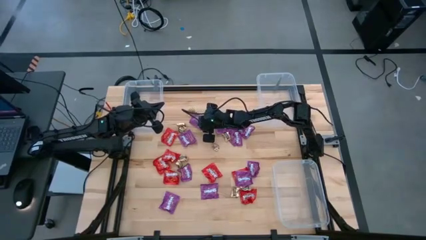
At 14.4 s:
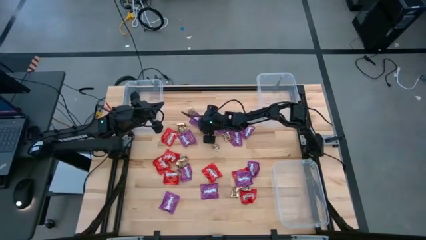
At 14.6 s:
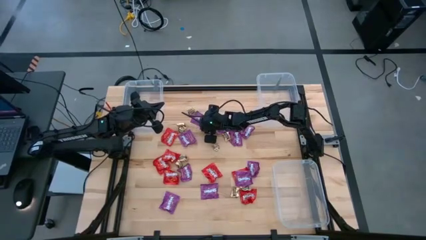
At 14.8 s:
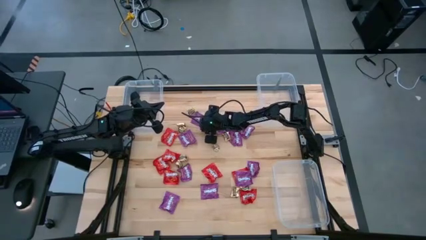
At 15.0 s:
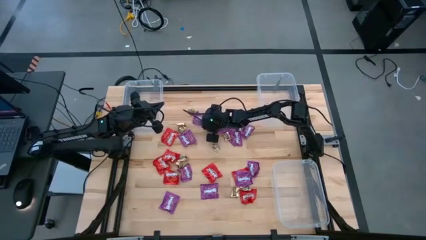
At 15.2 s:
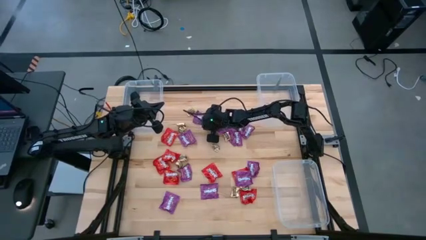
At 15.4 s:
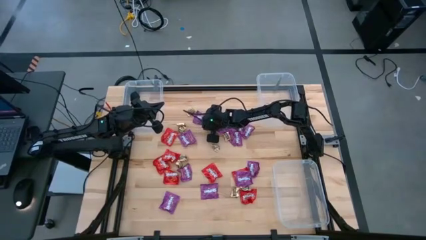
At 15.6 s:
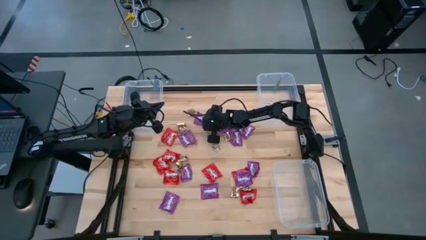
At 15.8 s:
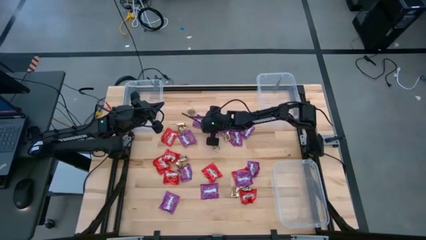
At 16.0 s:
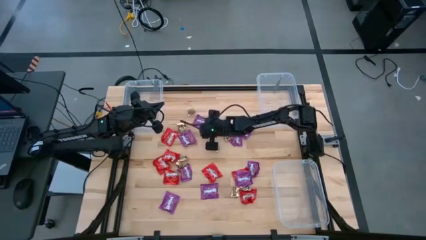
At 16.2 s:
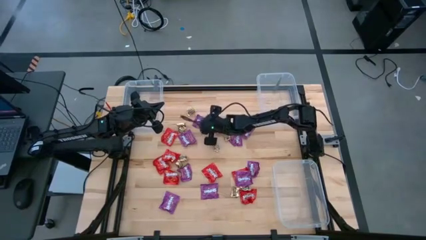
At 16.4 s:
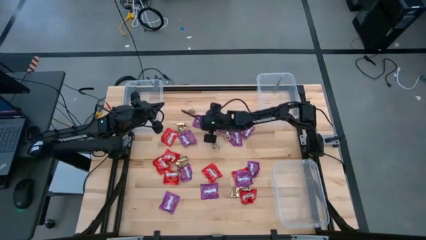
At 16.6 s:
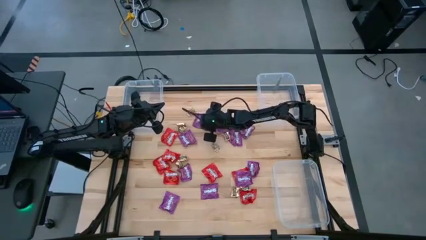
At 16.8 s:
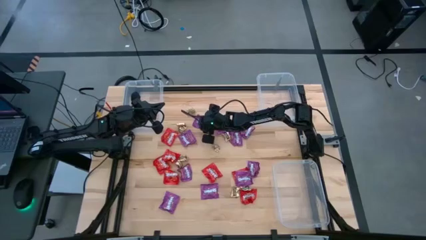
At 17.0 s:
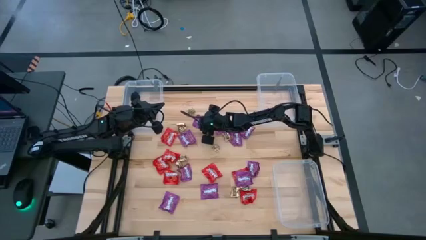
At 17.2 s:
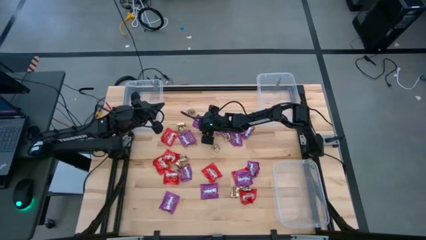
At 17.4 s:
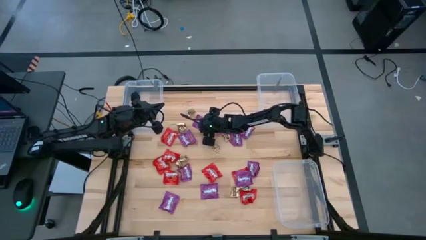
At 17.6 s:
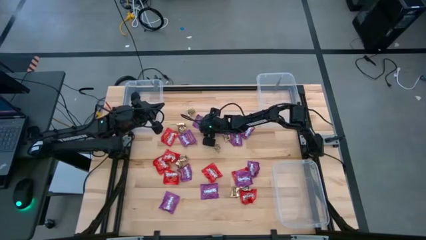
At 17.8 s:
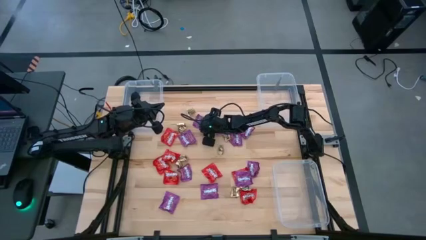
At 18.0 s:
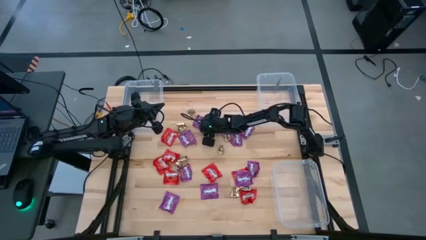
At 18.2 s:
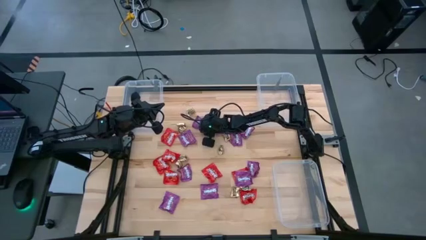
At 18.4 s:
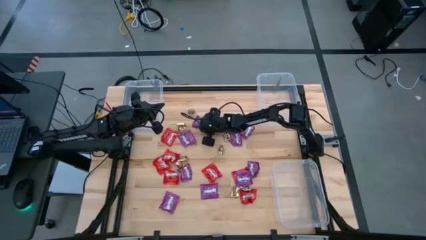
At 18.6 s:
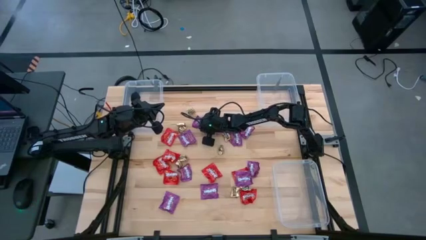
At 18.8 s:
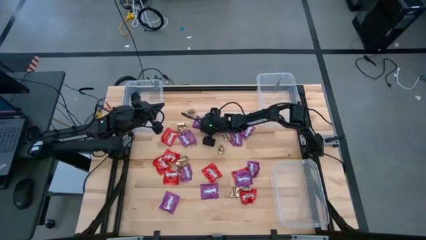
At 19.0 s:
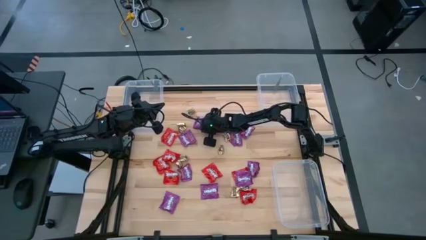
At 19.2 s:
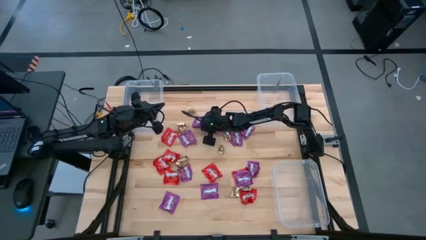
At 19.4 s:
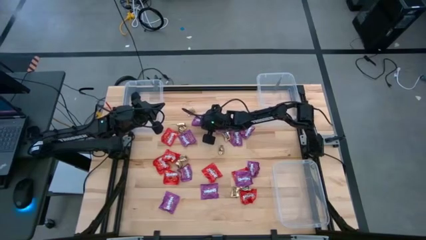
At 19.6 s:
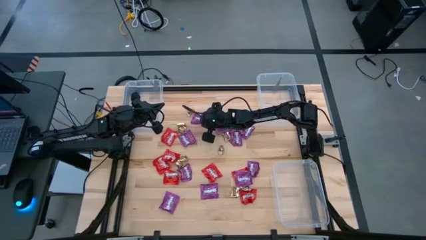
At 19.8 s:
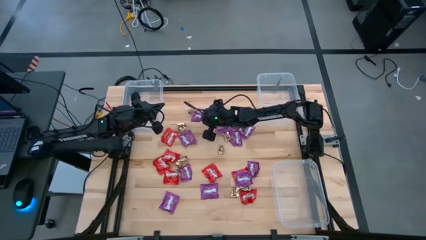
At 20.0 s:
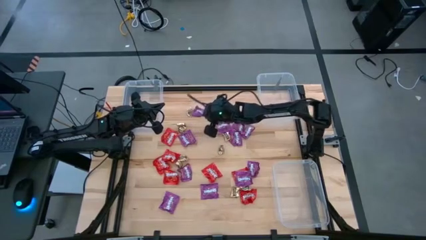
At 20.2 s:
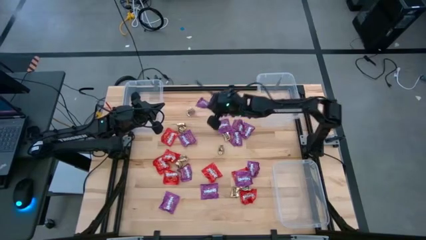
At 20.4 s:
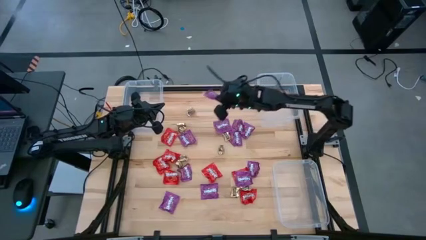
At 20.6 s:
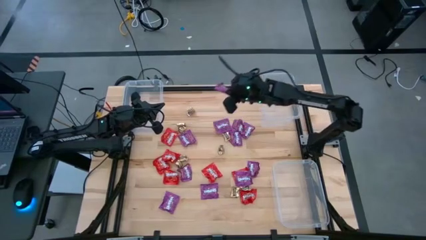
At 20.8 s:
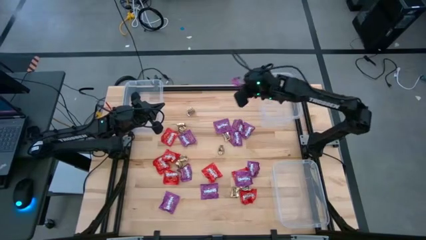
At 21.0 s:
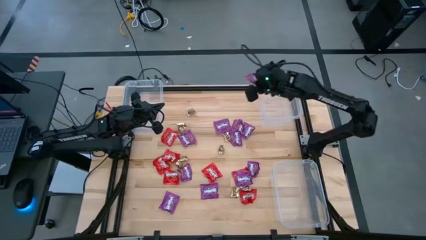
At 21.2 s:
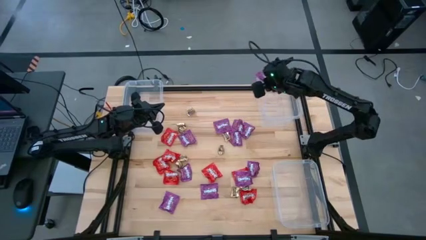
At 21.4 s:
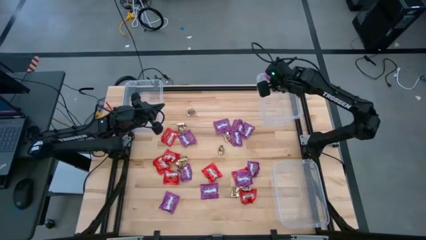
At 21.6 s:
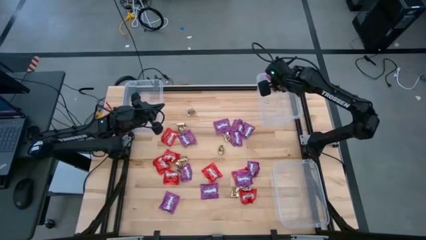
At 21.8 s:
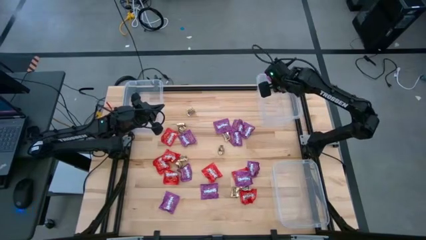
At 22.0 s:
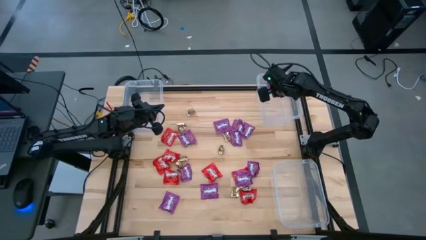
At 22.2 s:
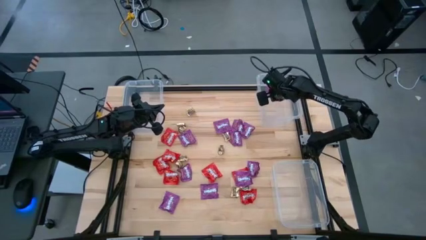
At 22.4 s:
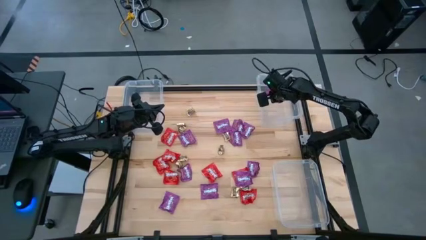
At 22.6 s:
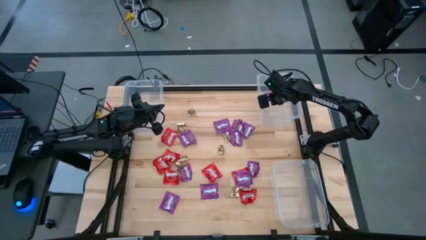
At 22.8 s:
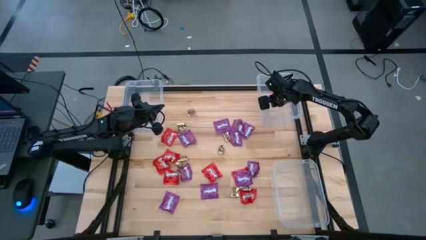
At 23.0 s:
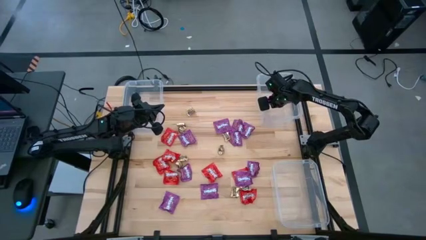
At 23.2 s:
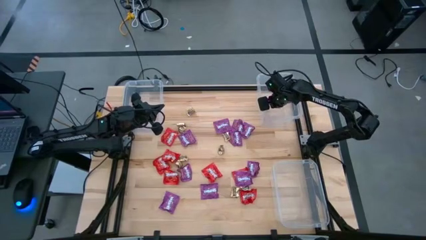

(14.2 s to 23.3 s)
Task: Sort candy
Put the purple candy into the top right transparent bin

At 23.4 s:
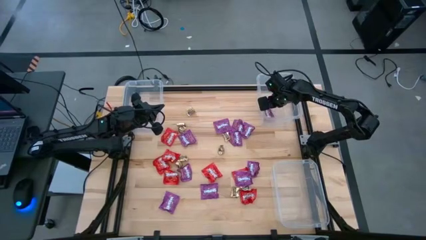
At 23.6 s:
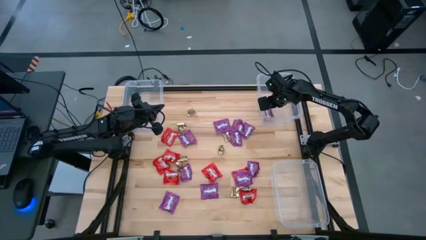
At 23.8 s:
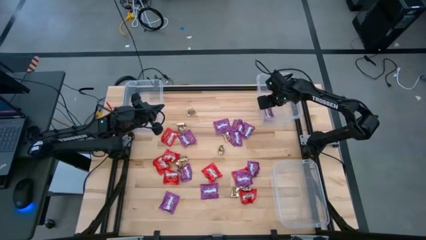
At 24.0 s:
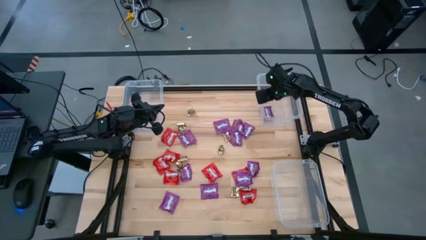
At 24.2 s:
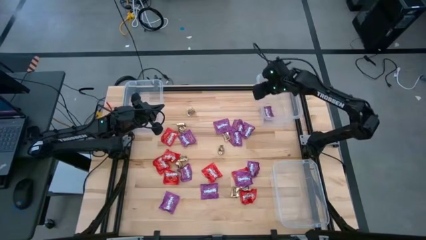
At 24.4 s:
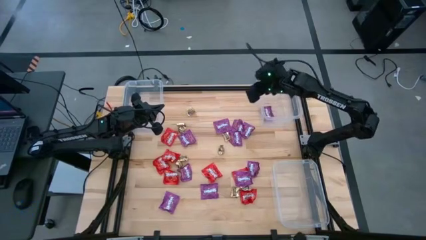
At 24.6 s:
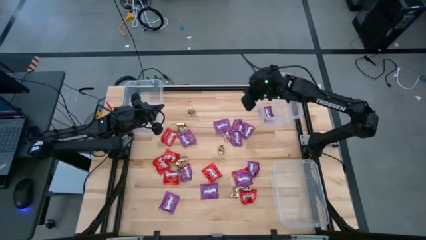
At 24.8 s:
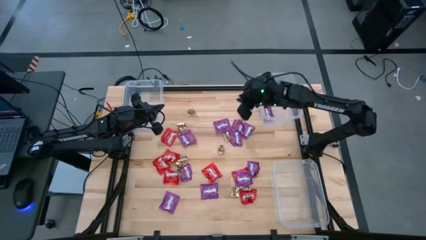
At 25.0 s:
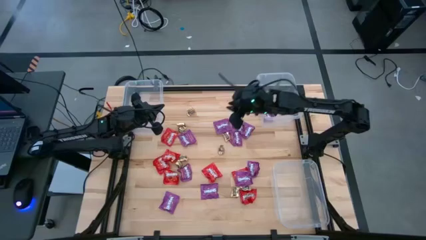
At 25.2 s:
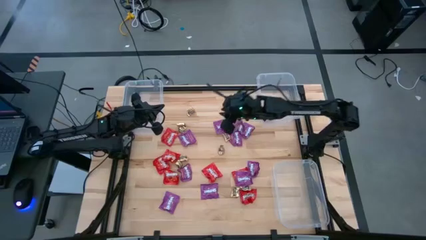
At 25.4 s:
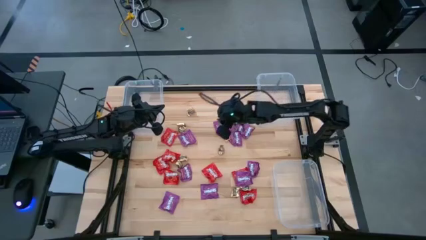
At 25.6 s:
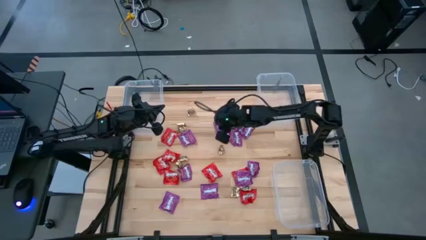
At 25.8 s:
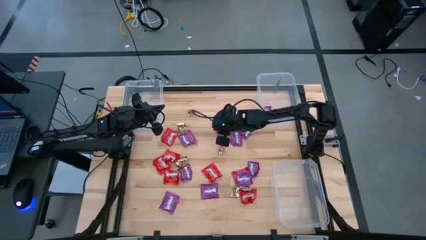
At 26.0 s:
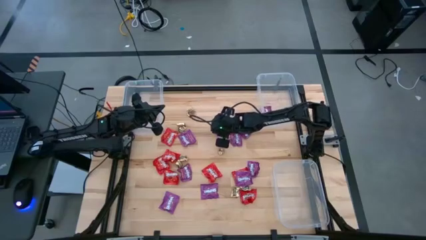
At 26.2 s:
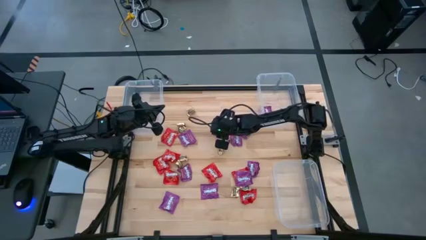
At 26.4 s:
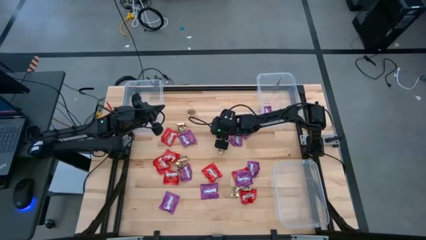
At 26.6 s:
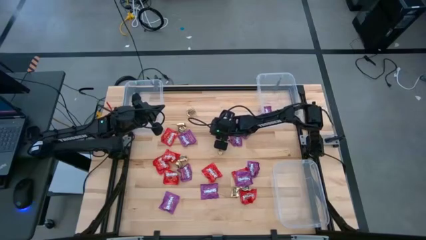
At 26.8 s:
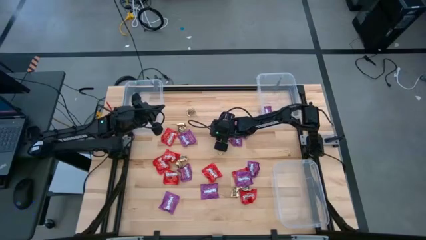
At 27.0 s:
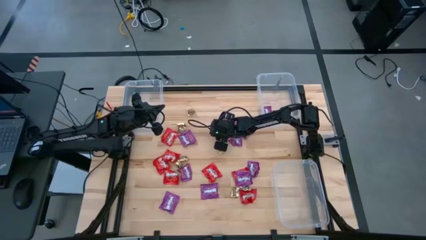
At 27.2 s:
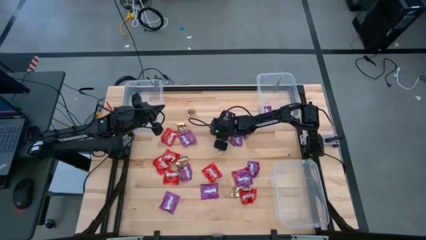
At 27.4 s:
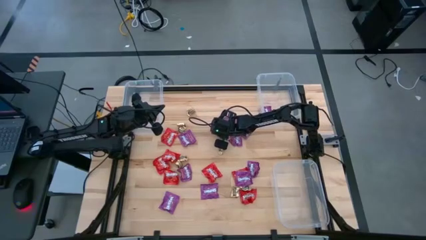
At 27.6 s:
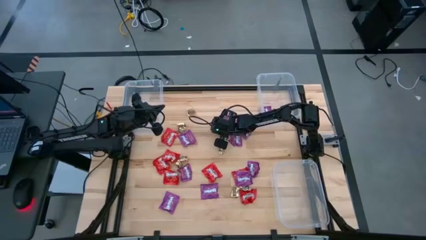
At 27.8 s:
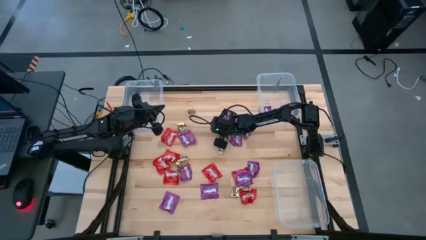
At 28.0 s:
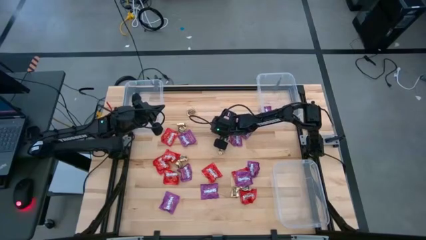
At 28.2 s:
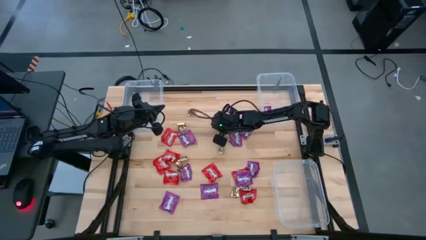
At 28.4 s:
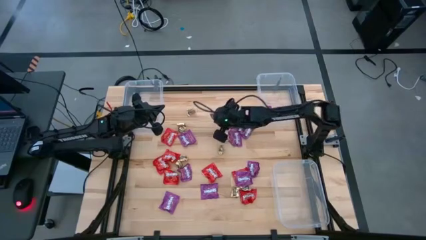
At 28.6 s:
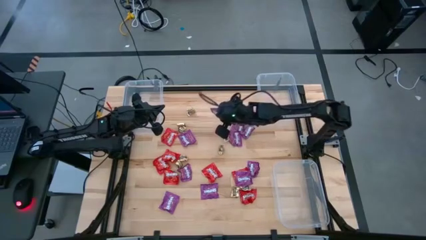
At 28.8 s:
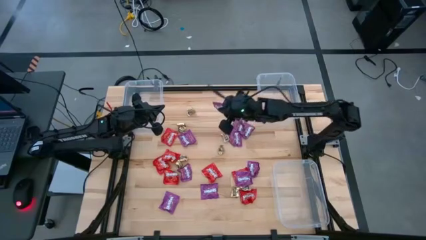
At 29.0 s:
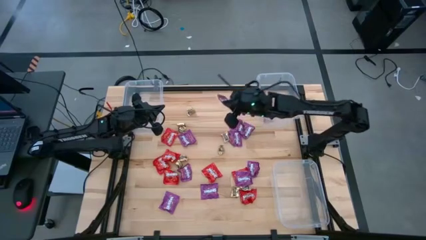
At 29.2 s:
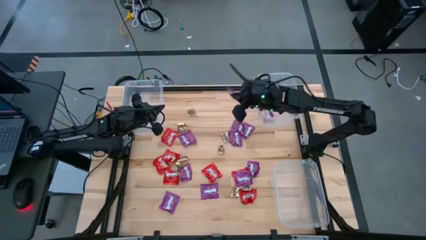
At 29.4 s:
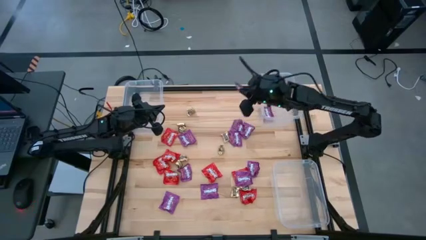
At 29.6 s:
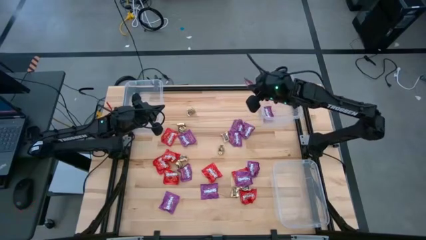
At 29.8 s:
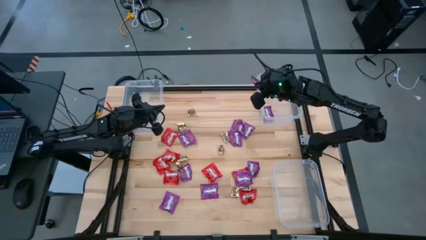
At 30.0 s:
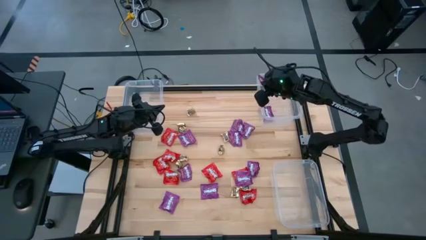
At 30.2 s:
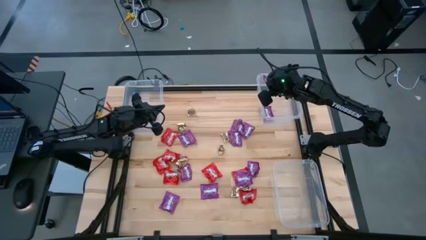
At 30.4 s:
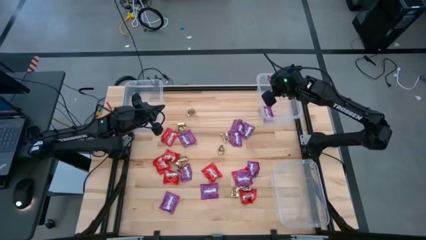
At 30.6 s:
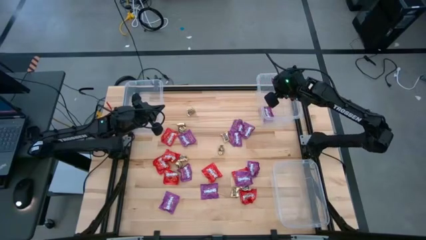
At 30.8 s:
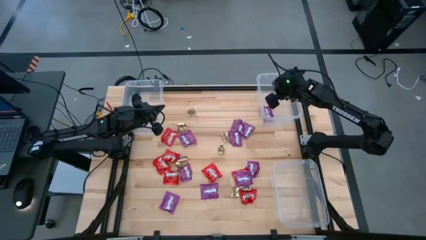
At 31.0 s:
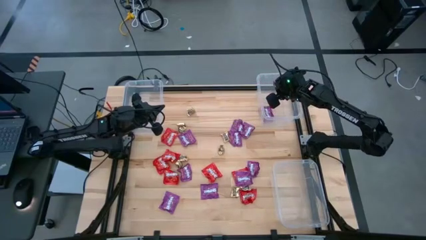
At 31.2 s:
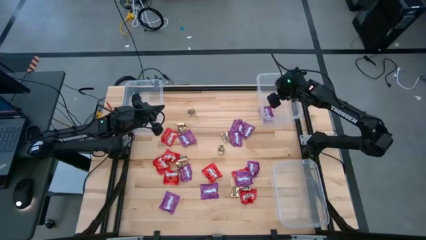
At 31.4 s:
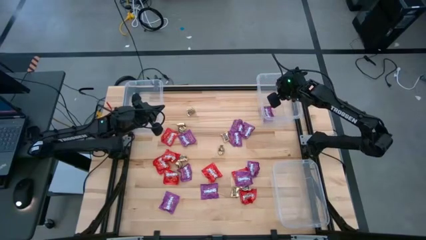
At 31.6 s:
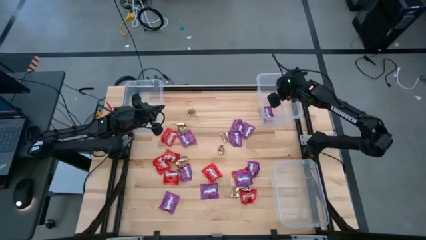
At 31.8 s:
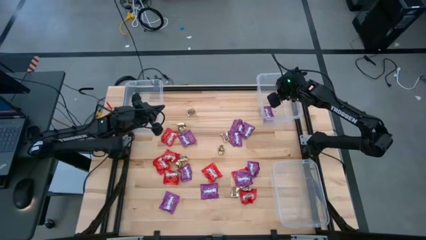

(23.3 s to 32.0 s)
Put the purple candy into the top right transparent bin
